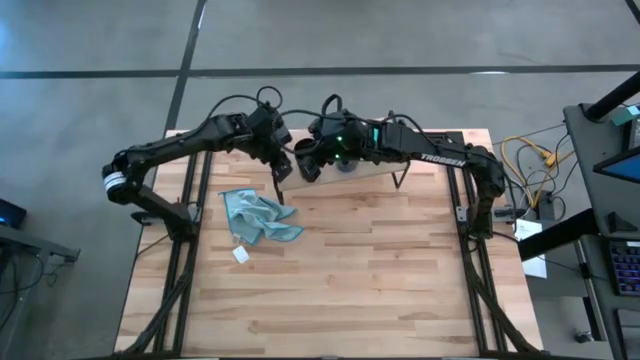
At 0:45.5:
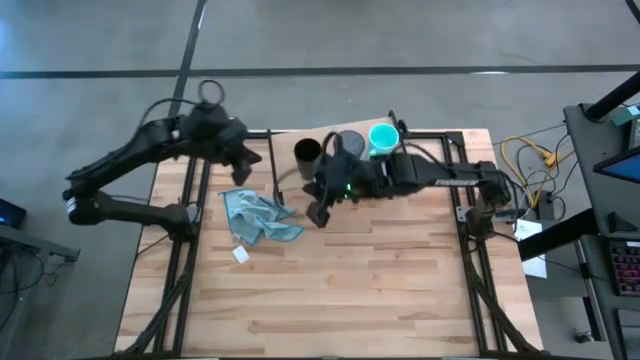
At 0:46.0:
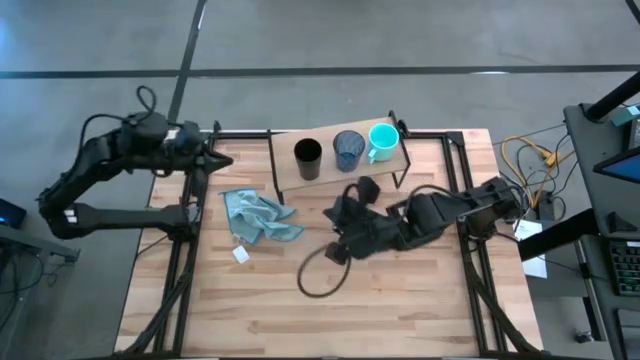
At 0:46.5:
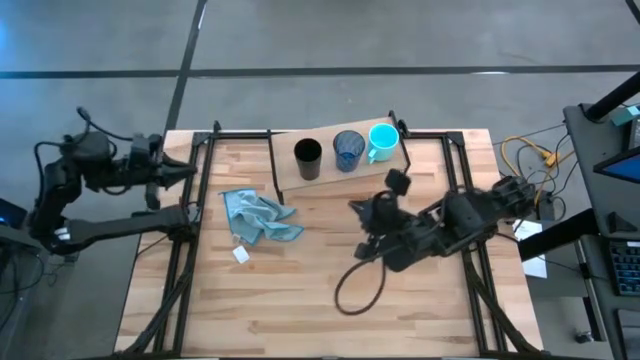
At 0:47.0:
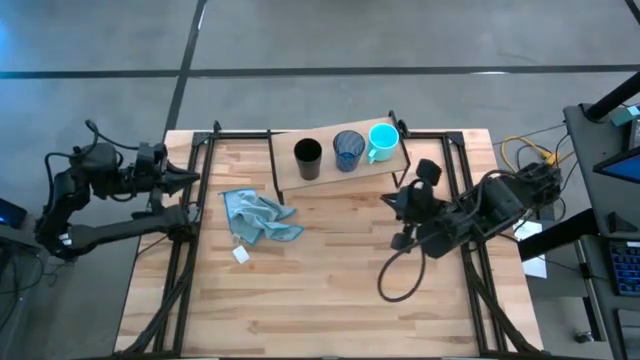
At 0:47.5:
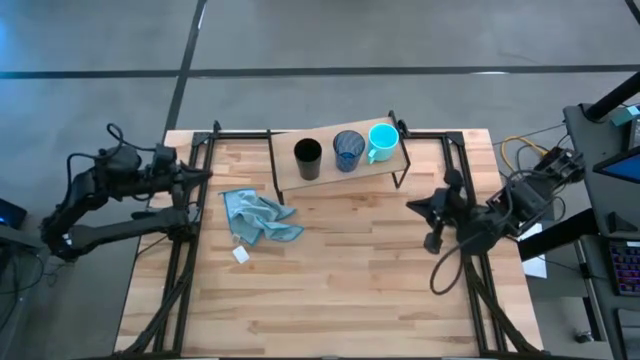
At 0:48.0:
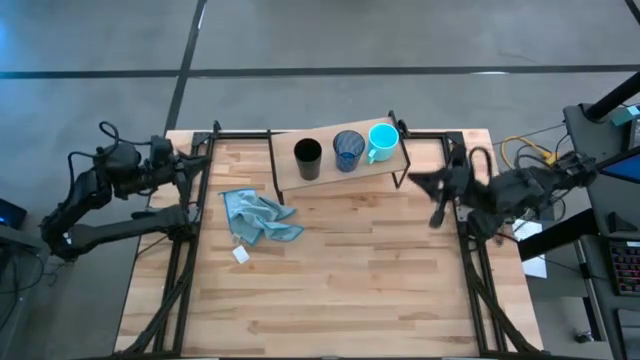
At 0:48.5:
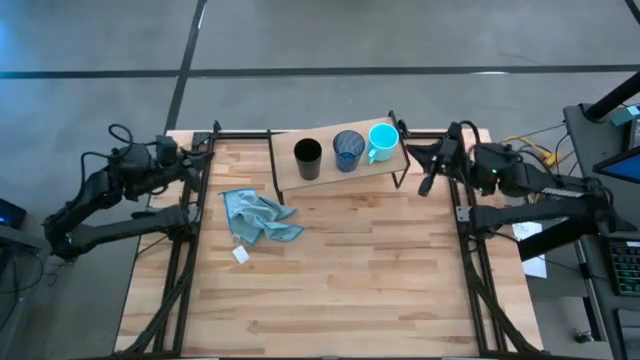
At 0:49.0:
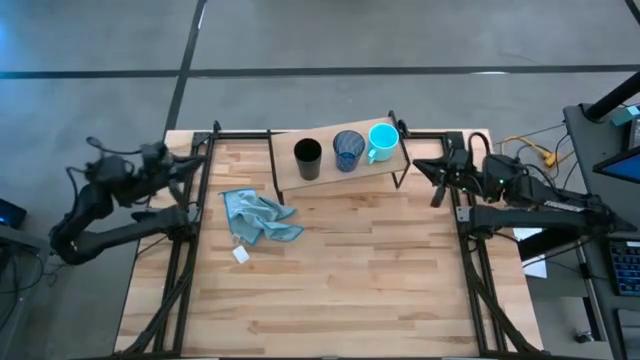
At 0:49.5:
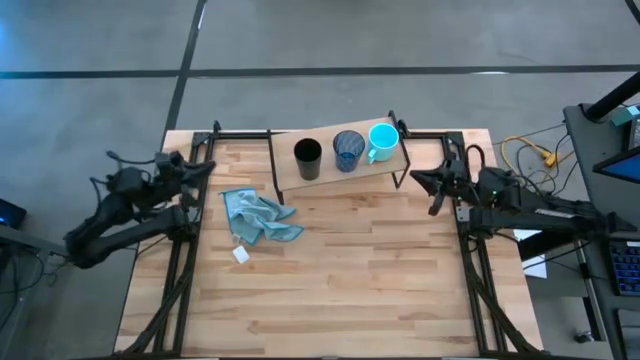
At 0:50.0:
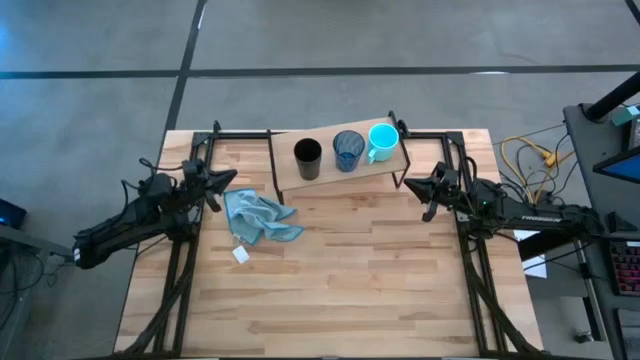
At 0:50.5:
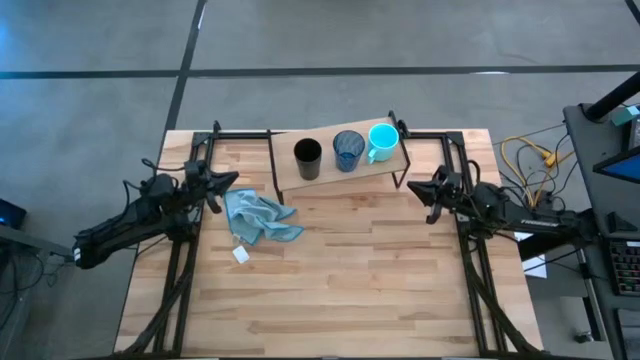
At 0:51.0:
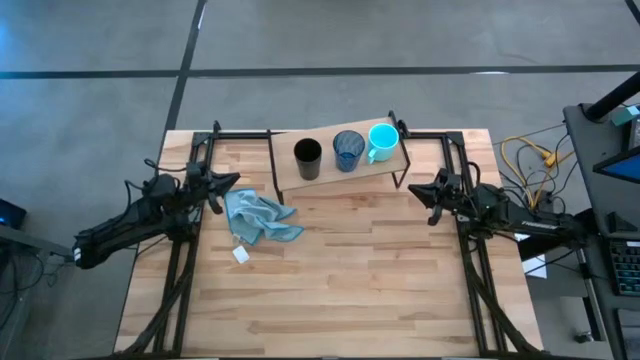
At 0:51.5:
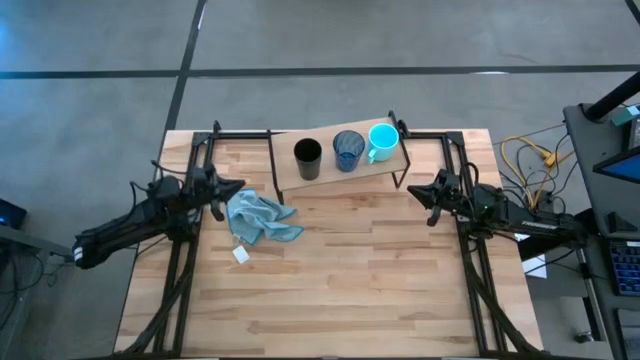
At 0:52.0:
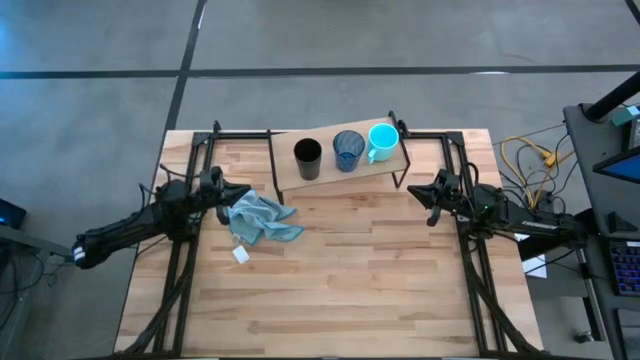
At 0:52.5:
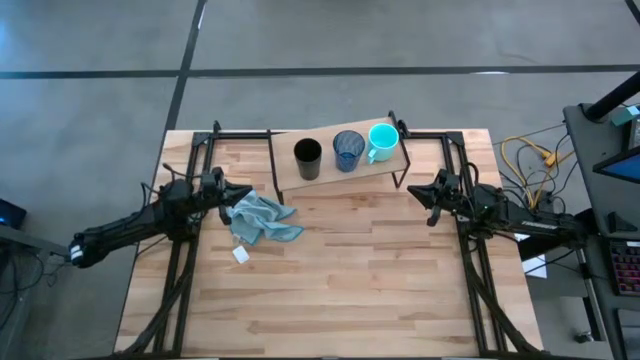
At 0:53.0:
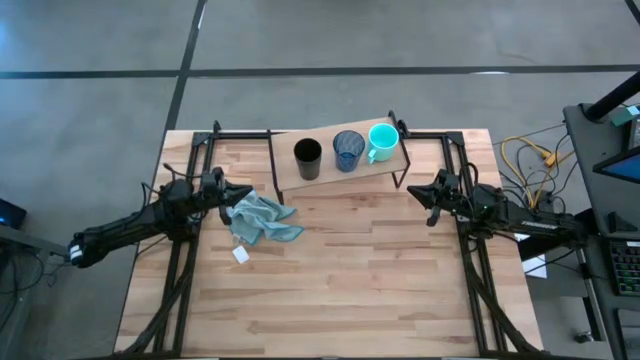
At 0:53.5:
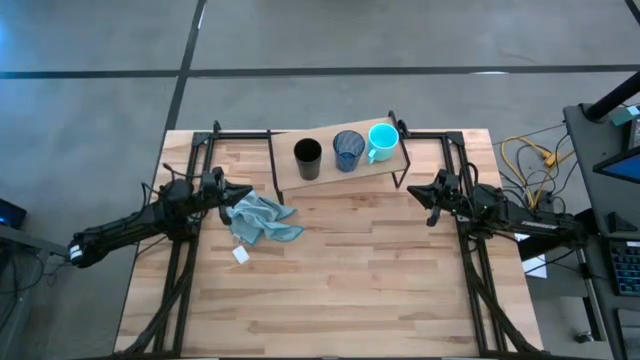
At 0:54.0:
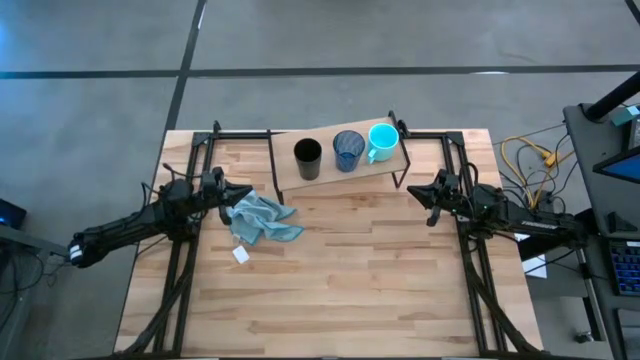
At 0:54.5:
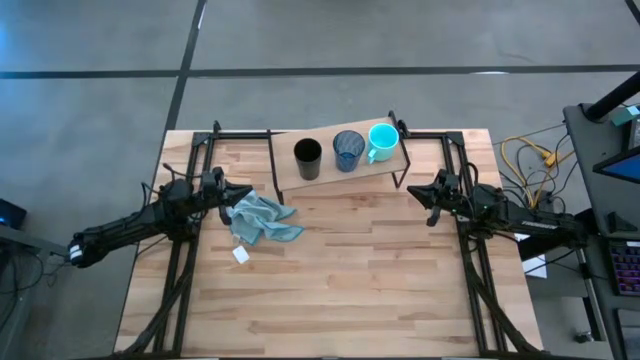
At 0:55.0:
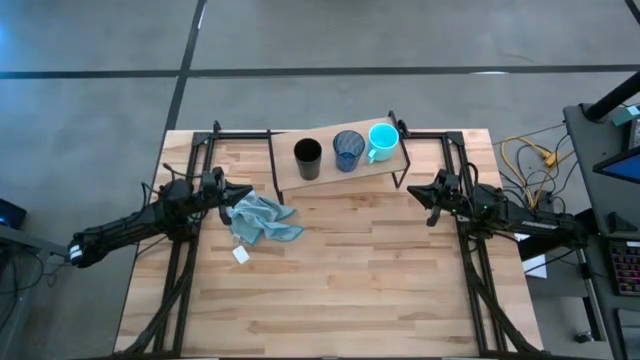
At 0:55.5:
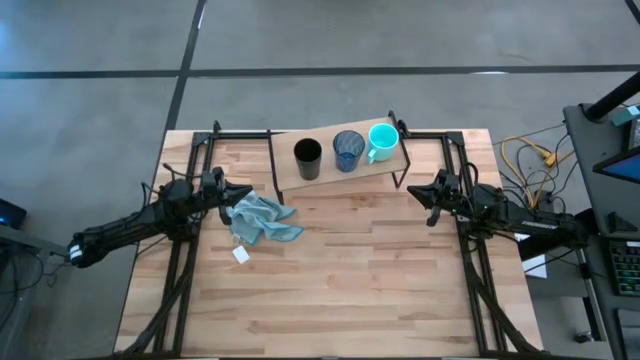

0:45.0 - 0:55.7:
Task: Stack small to large cups/mugs on shelf
Return to Home Position

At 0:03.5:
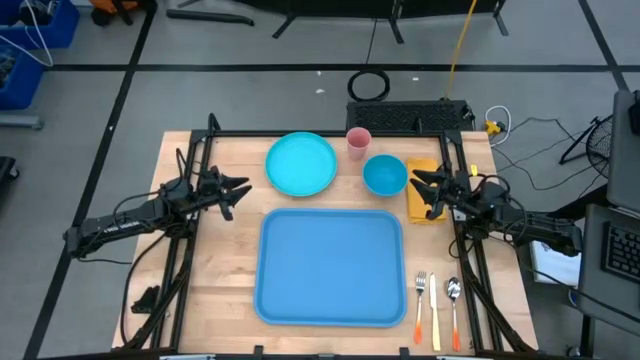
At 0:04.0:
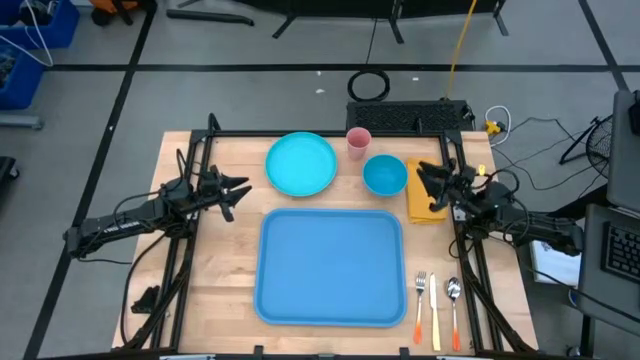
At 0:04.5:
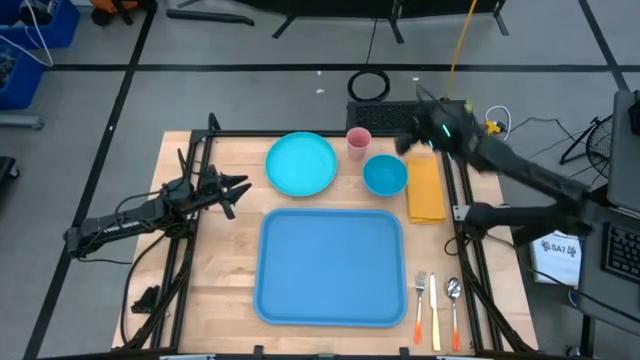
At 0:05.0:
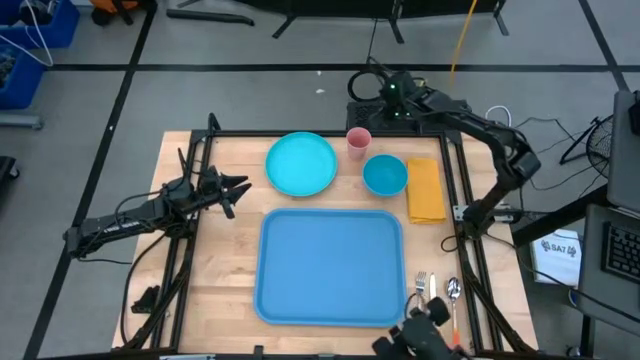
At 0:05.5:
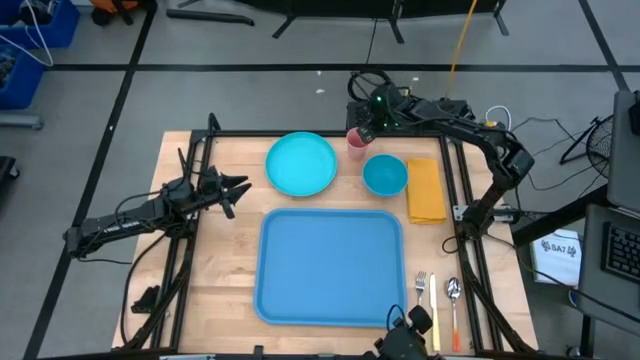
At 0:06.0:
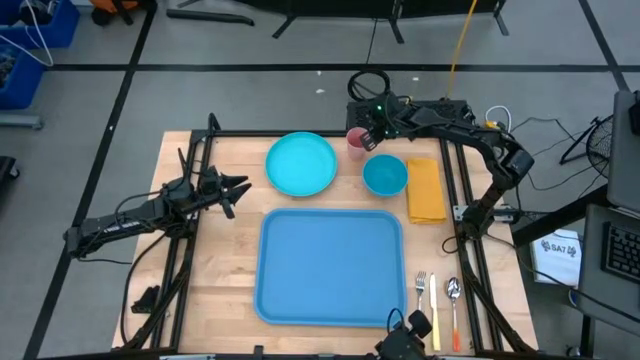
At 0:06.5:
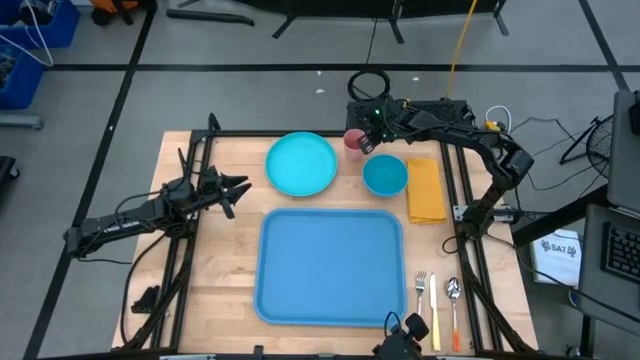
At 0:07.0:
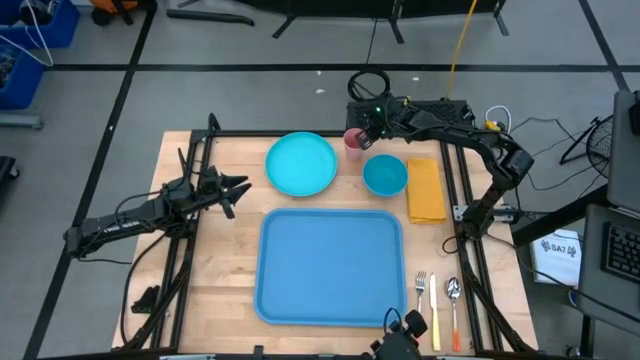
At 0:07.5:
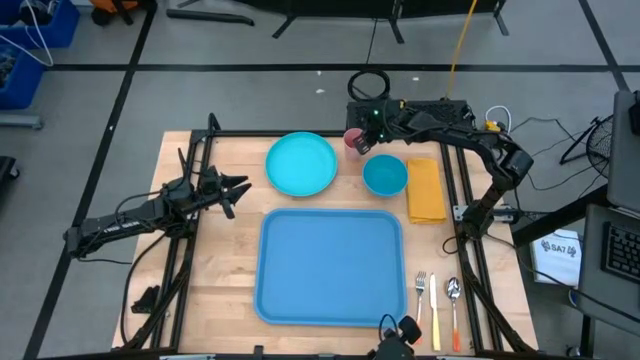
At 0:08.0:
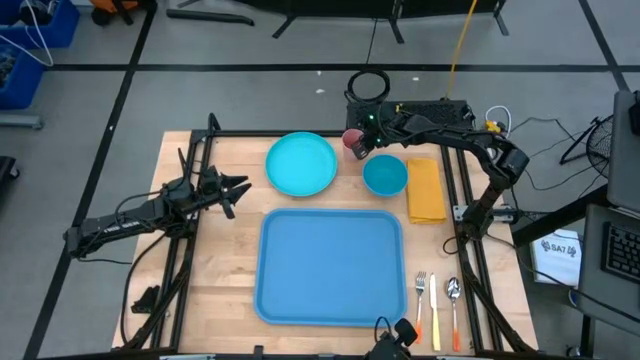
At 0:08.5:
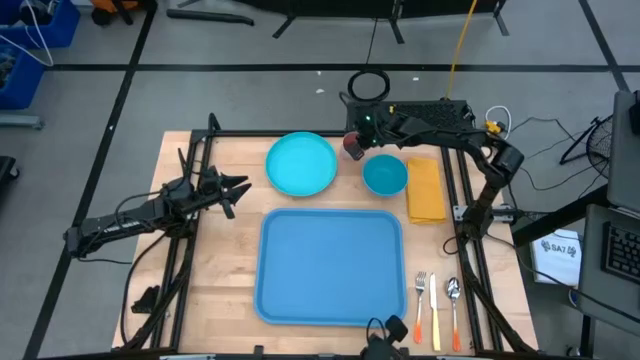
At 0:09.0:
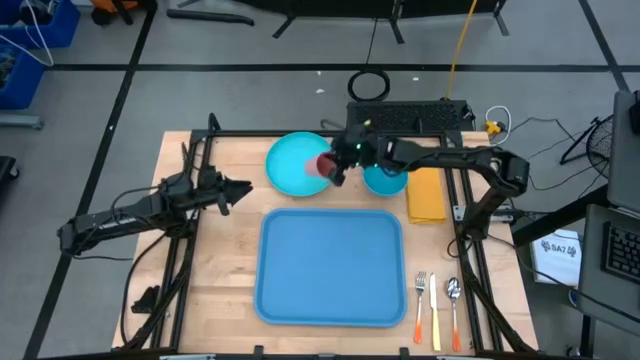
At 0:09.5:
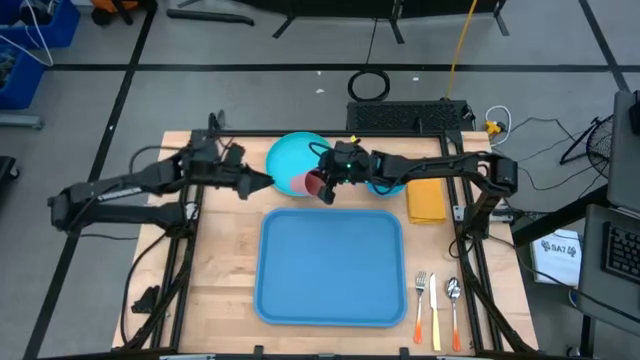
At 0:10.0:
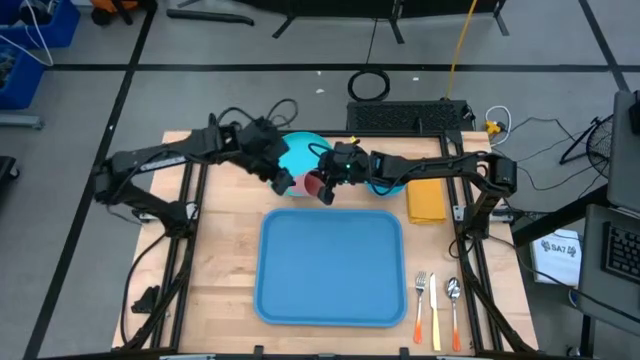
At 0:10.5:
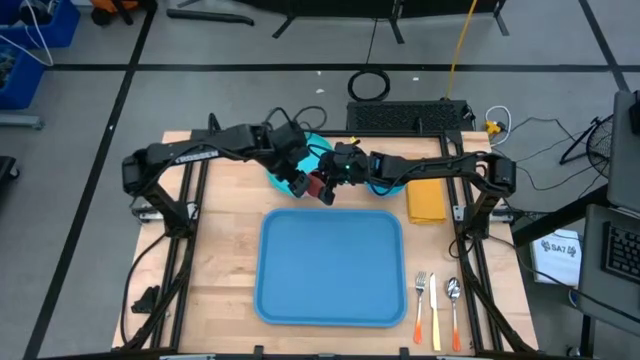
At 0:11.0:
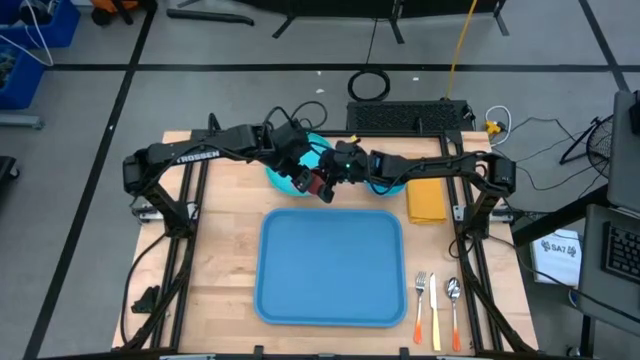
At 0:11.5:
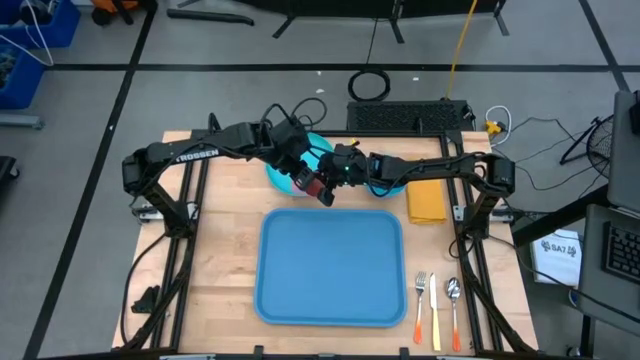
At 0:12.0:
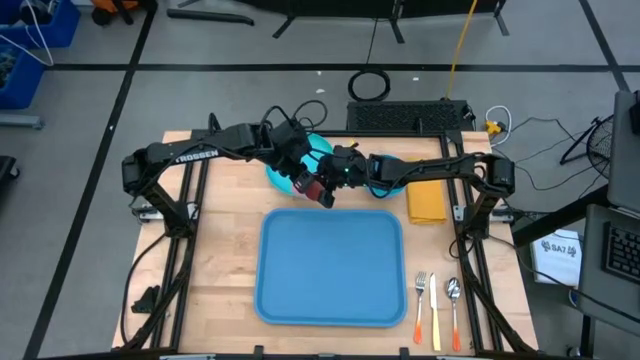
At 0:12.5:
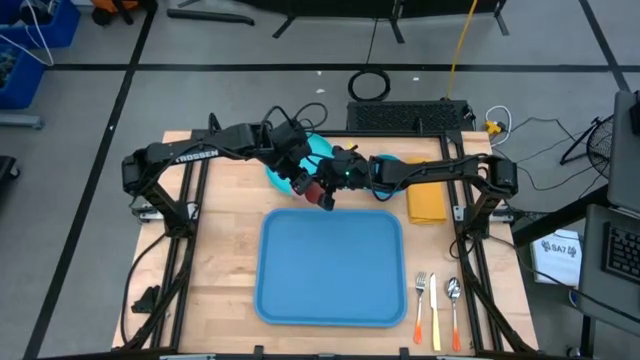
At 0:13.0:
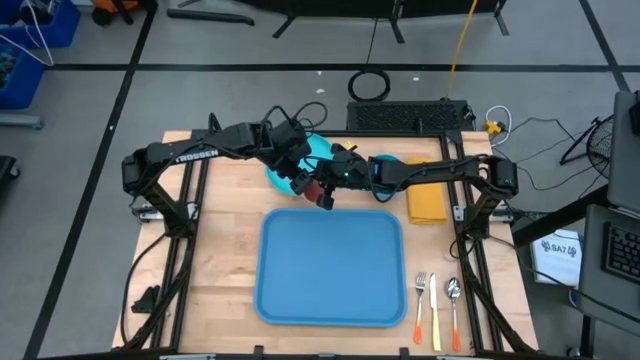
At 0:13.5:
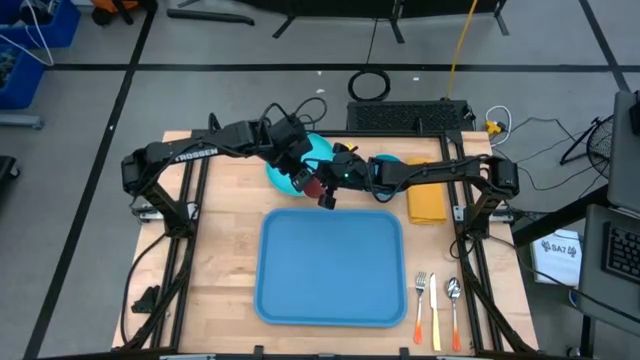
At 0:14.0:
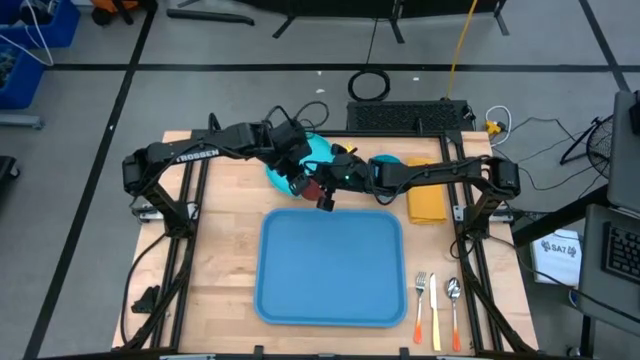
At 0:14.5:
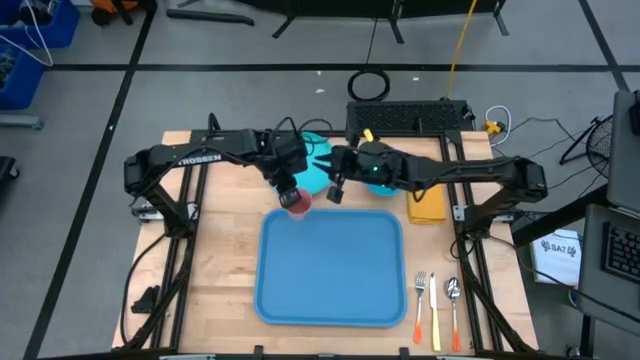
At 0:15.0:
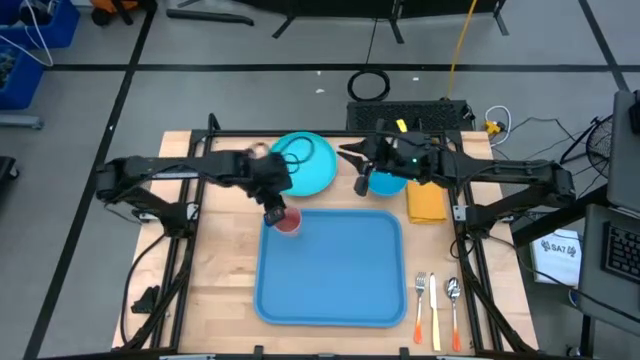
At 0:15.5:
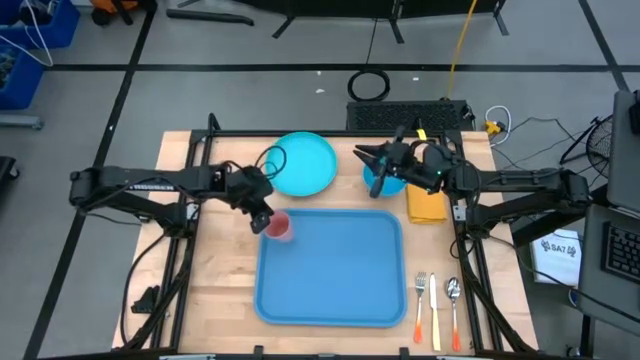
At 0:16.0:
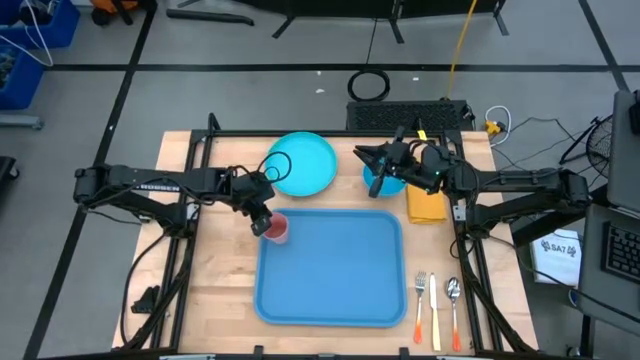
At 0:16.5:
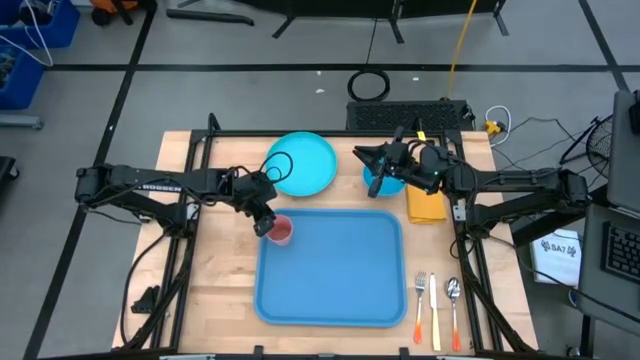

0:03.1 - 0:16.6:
Task: Set up tray
Put the pink cup on the serving tray
